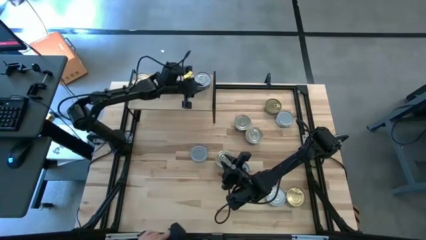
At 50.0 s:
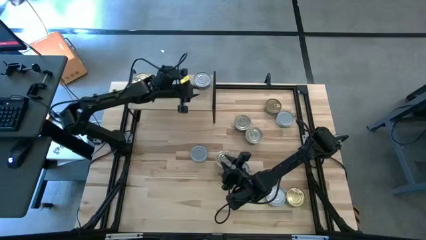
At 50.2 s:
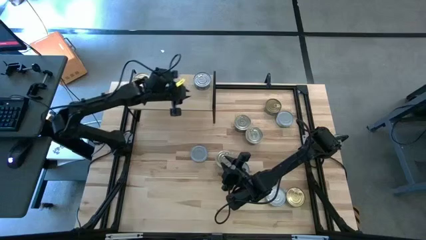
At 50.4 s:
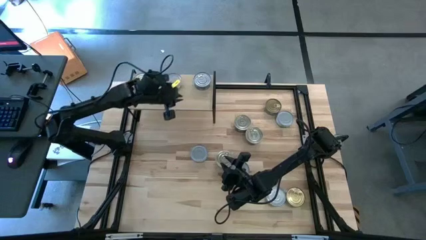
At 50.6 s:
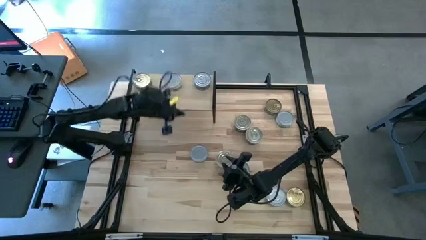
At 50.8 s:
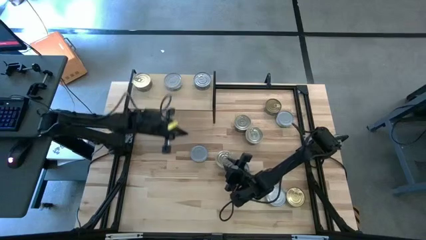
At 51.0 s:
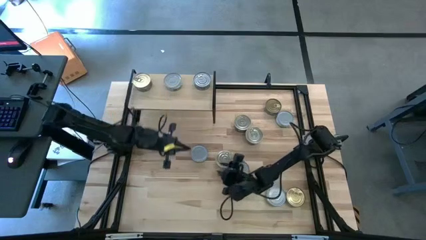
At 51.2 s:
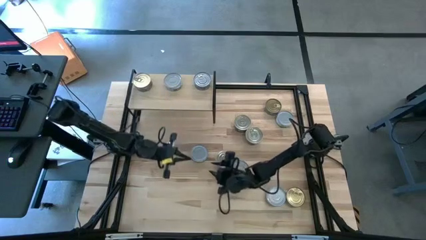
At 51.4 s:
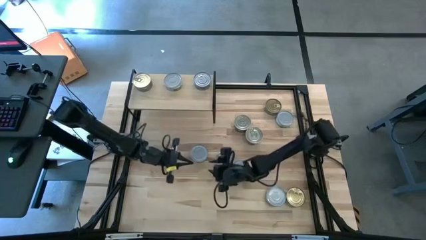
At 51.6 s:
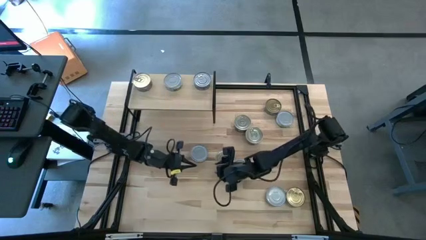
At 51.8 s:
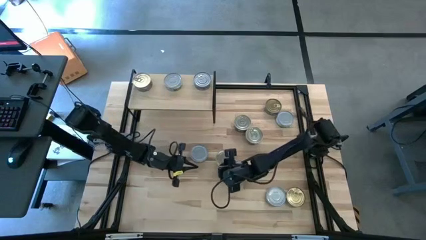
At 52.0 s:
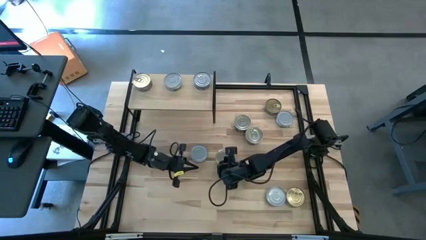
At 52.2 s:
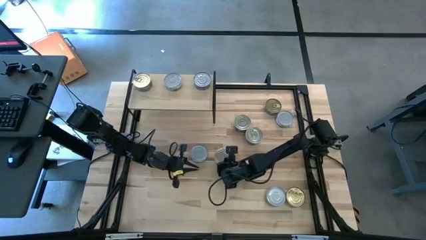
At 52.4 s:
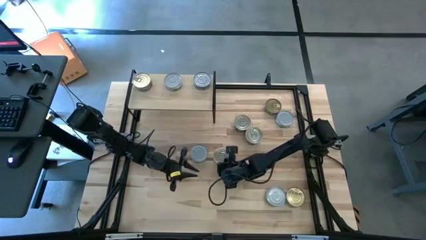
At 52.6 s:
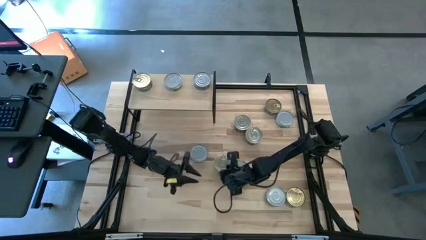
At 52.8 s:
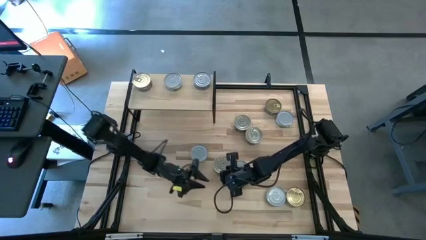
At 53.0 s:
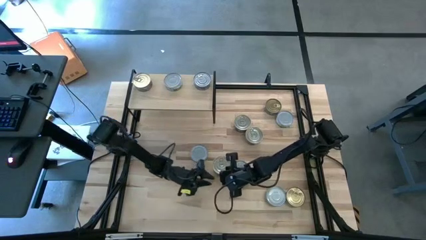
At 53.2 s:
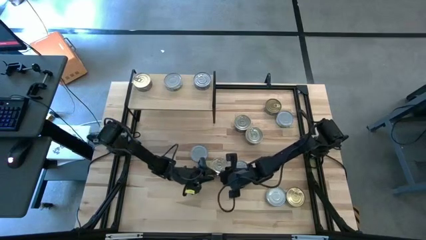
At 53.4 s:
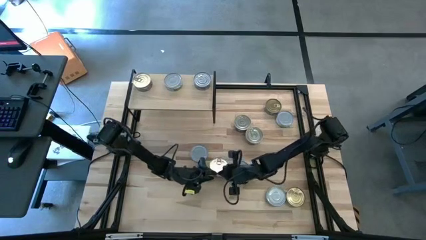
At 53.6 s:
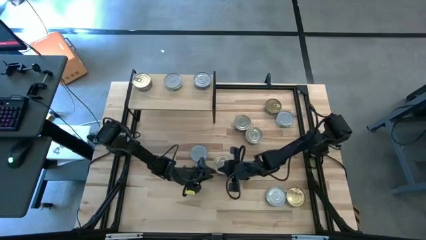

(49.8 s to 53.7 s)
Task: Stack canned seafood by type on shelf
Put the blue tuna can on the shelf aligned with the other blue tuna can

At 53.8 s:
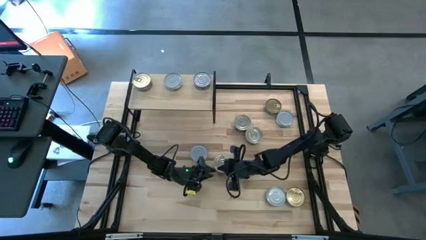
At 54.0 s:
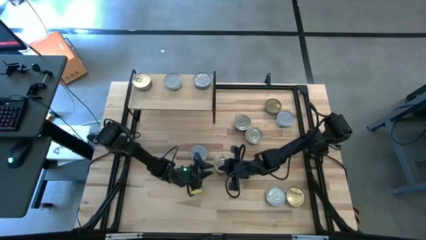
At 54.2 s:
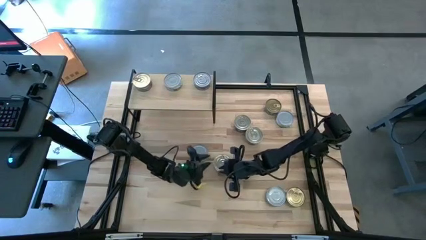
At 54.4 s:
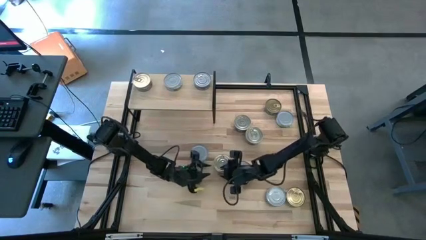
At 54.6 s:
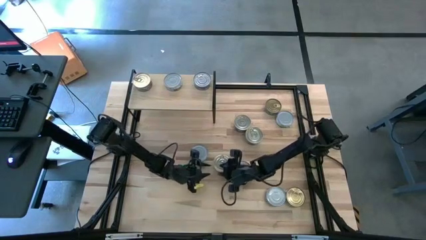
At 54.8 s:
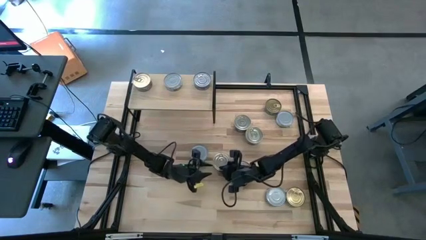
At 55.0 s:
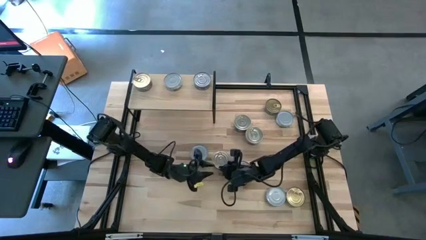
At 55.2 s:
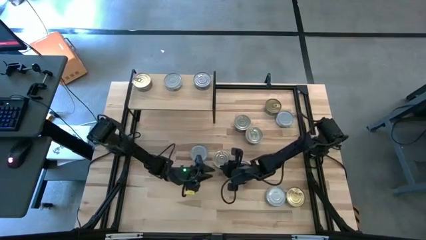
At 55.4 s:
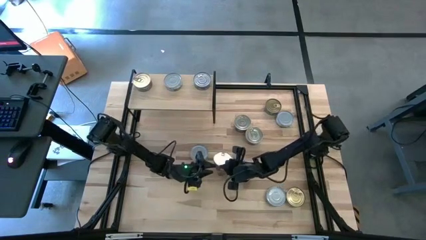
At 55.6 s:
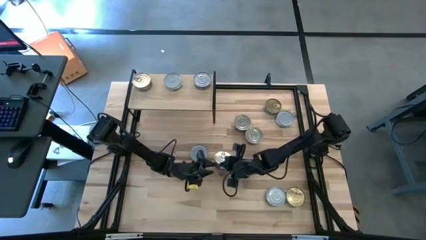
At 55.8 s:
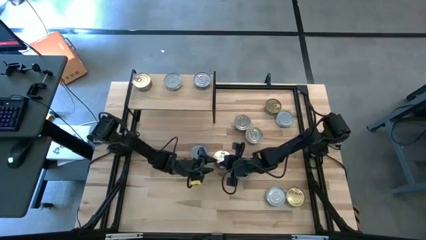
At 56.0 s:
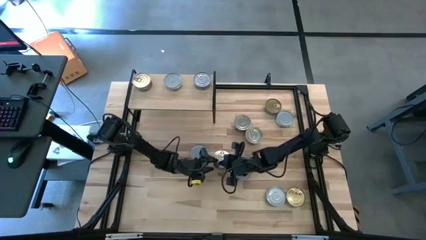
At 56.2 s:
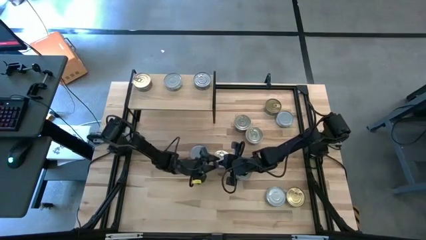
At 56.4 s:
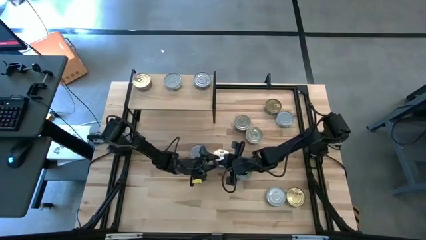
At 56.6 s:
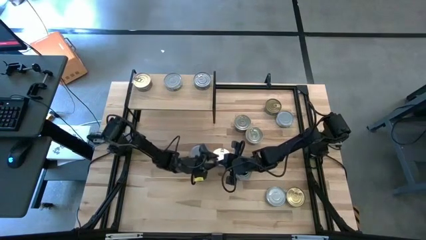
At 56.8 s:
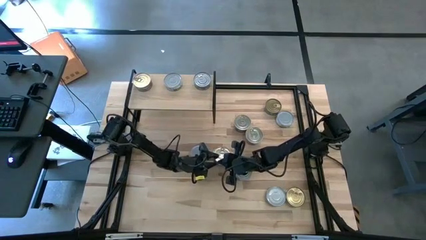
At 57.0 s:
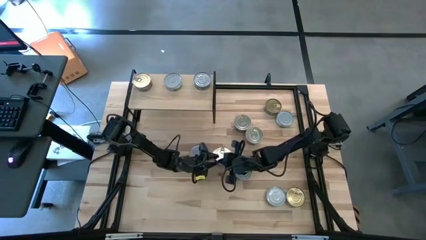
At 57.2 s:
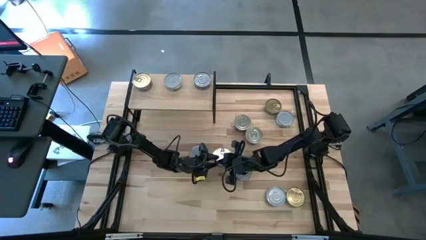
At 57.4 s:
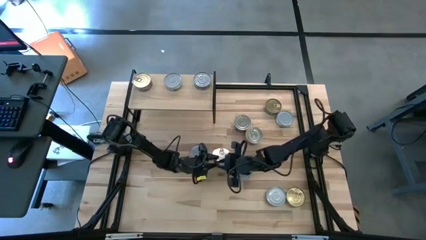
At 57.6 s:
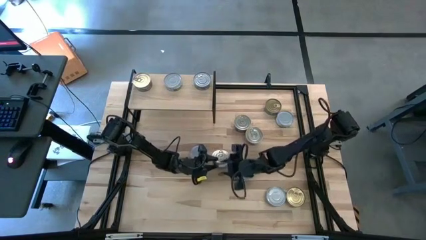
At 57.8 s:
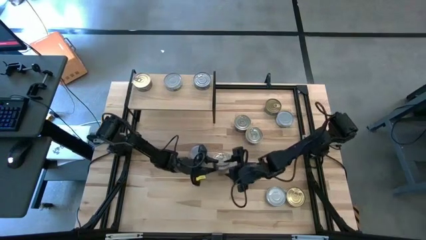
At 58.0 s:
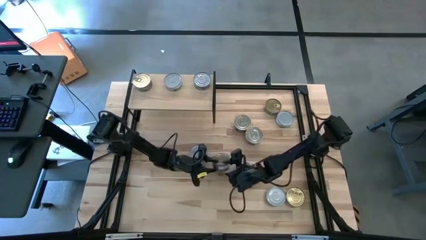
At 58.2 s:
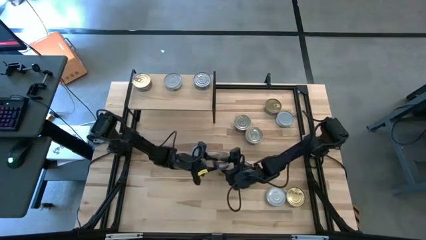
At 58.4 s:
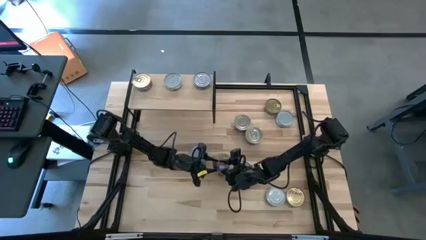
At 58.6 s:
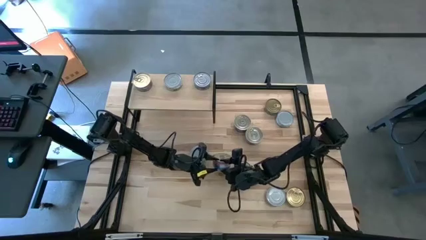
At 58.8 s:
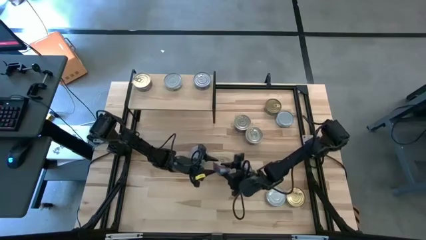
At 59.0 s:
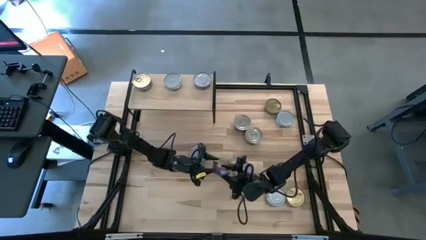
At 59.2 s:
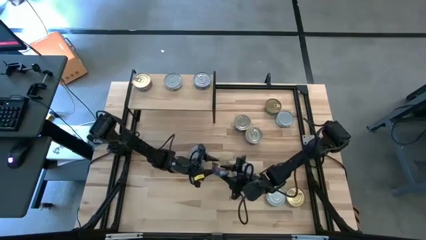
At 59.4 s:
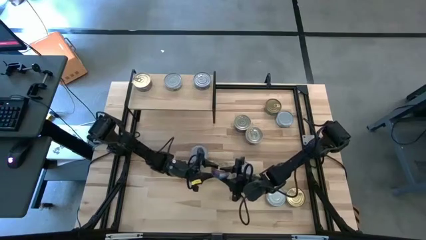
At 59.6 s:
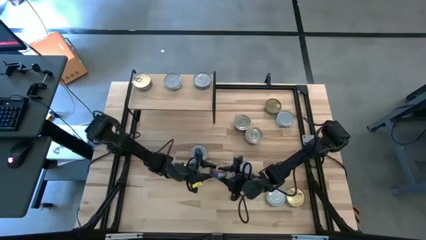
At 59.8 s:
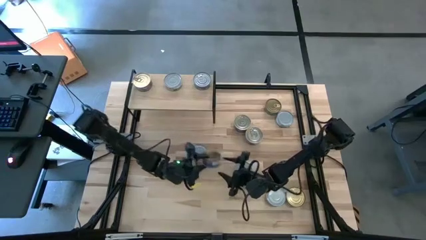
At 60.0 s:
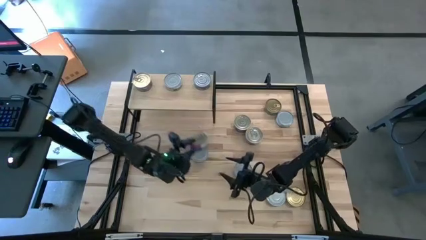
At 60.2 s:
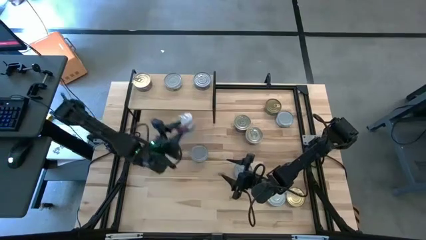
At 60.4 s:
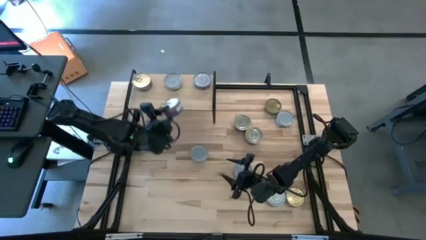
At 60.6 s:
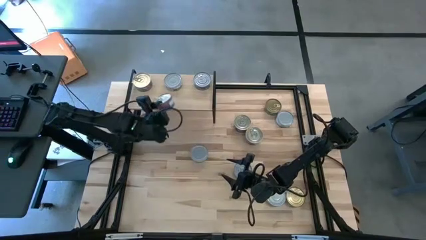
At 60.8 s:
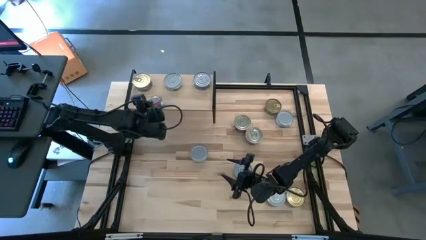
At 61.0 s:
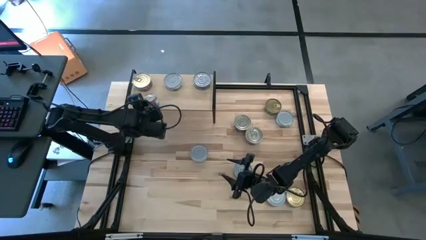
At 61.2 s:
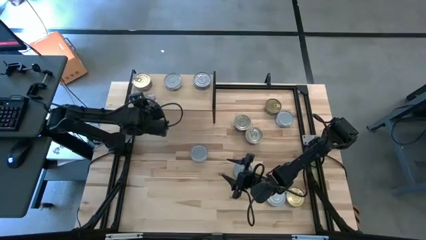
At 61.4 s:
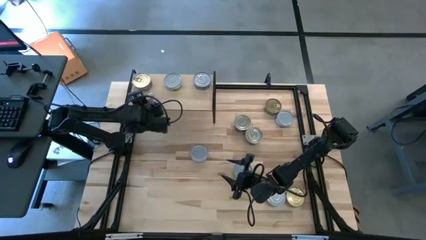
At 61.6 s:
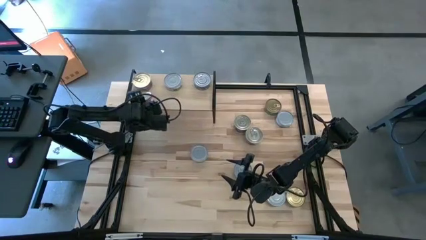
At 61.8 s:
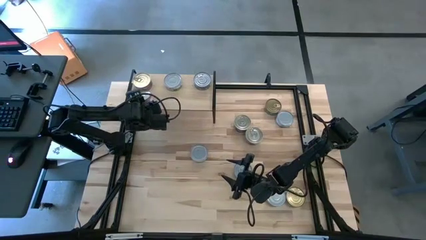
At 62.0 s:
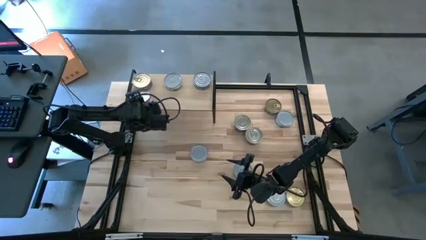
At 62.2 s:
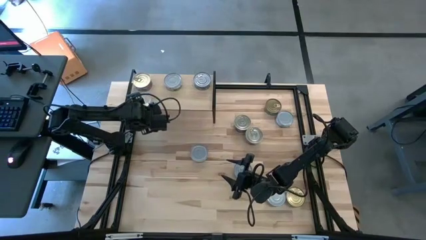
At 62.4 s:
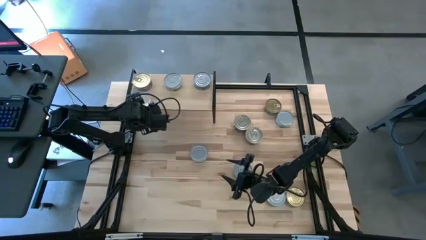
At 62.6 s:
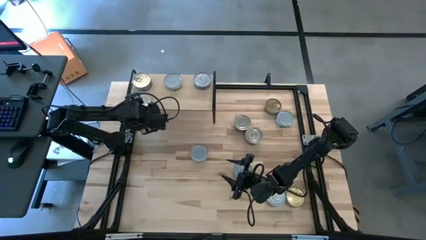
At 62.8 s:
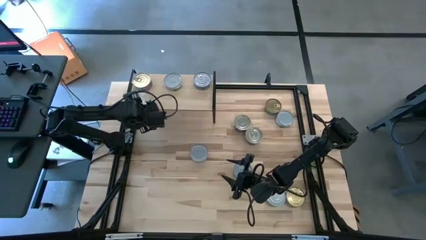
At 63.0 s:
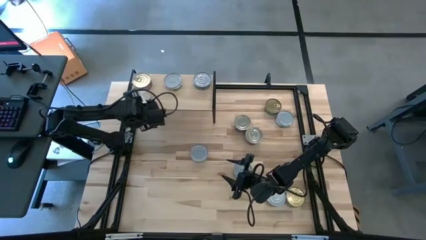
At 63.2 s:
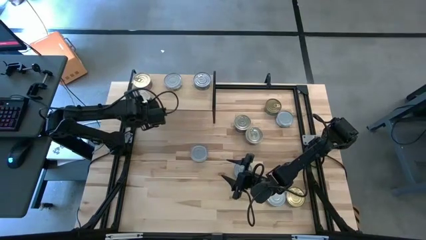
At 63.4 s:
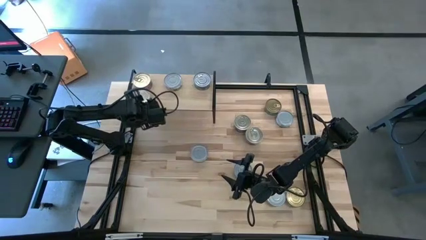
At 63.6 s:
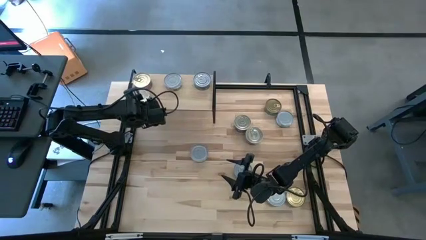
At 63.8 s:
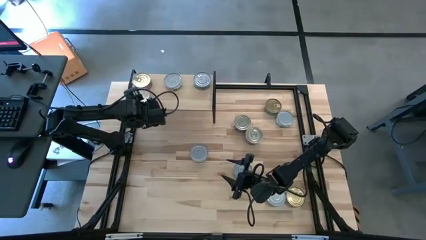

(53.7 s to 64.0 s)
Put the blue tuna can on the shelf aligned with the other blue tuna can
